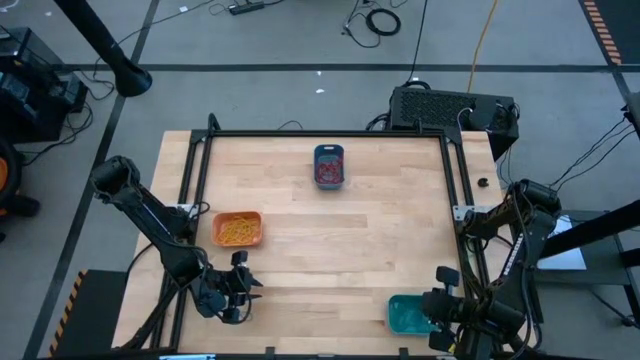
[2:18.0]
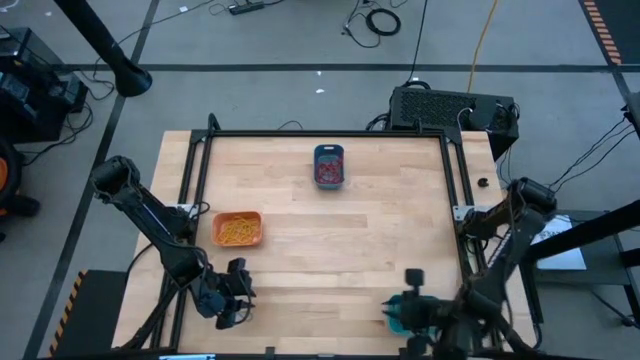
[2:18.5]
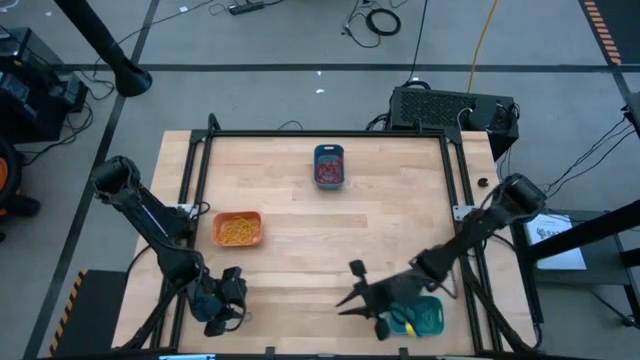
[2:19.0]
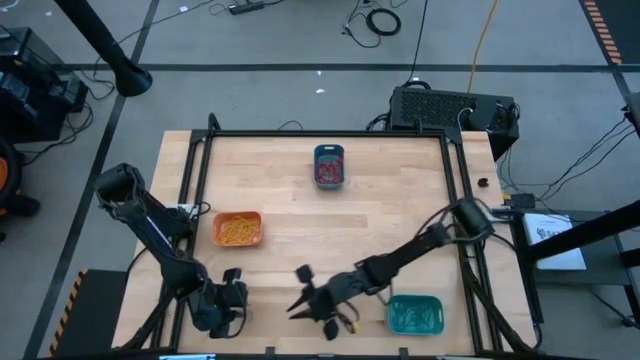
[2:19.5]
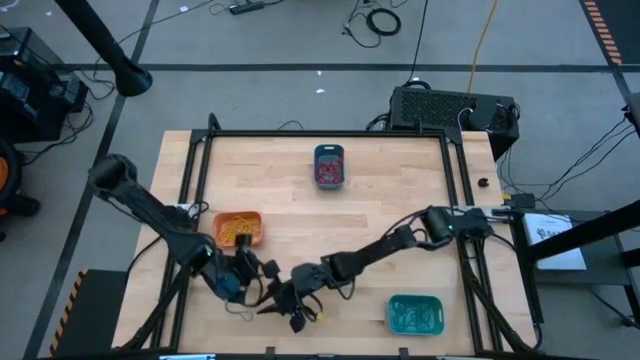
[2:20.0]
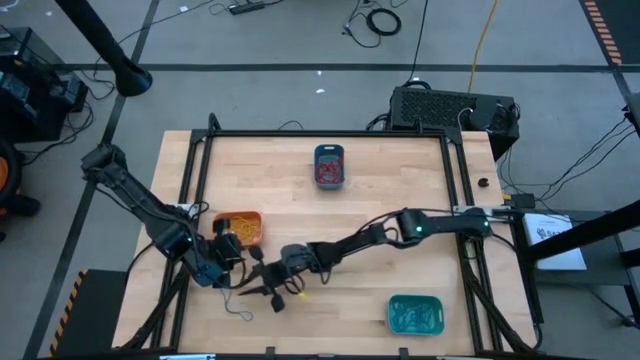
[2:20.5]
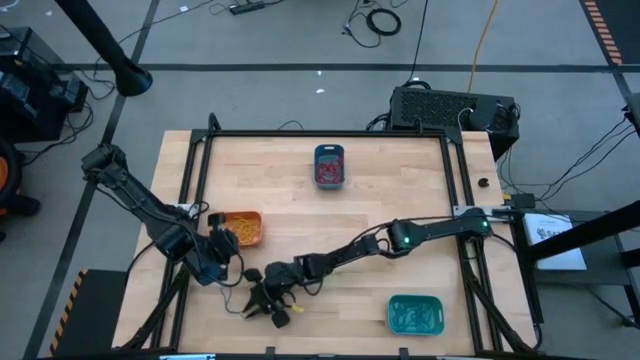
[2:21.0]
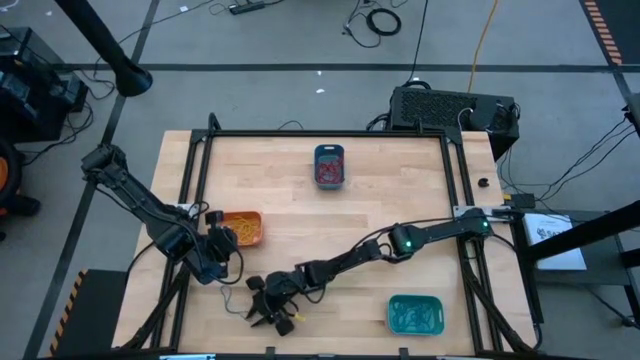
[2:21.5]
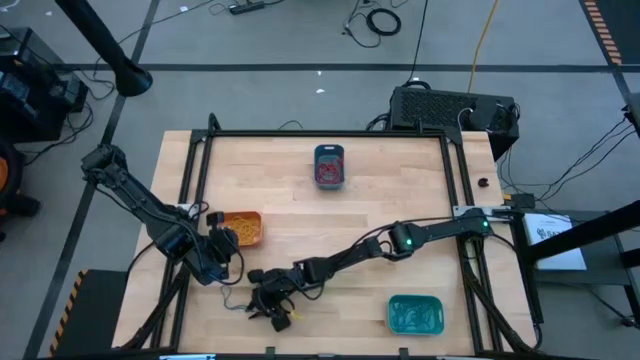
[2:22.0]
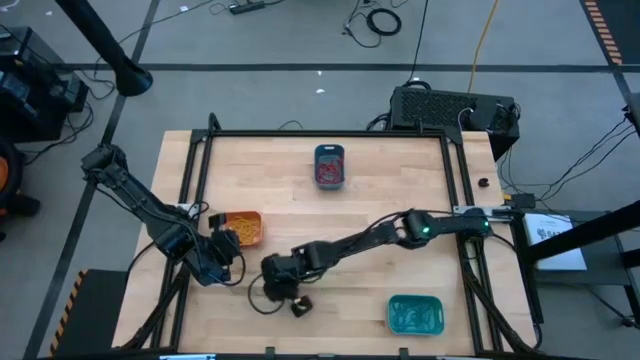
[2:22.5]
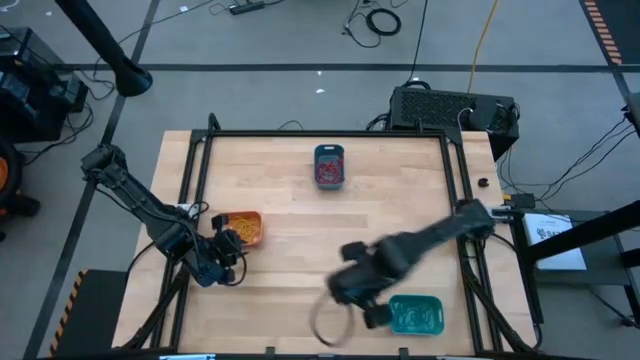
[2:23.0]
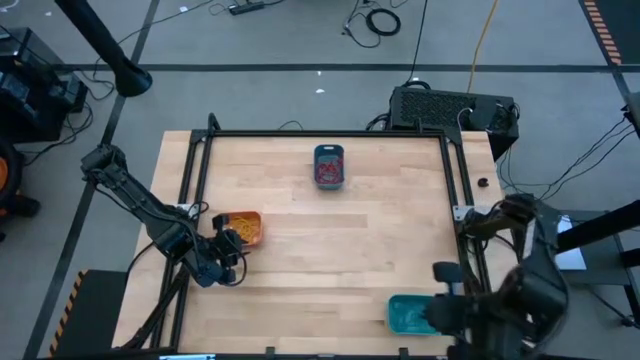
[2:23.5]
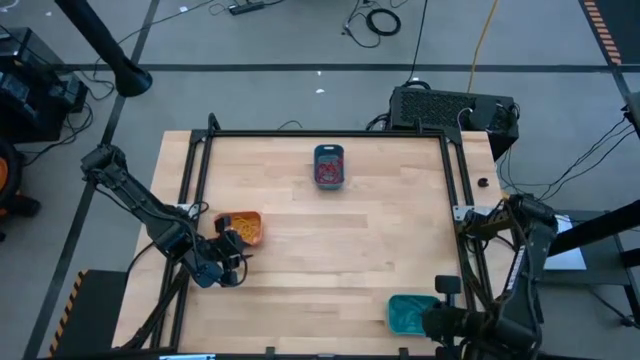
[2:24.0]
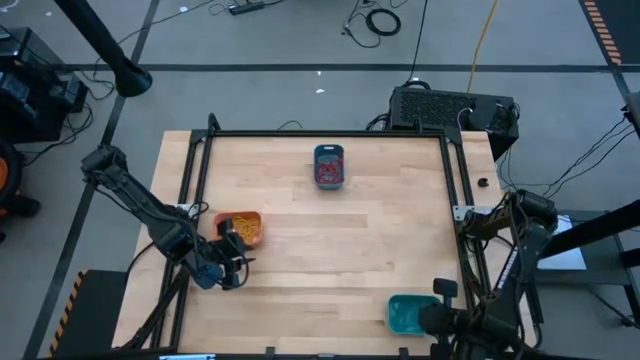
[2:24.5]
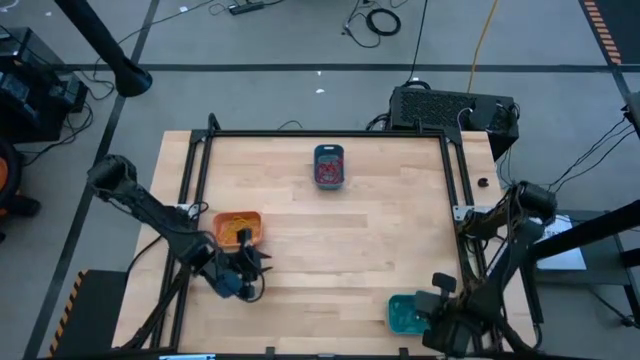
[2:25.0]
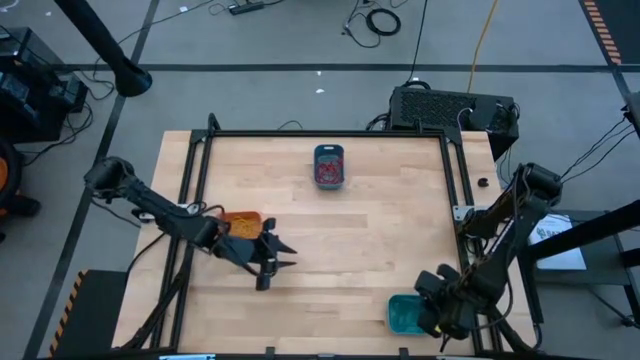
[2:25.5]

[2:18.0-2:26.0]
Task: Sort rubber bands into baskets
Put the blue rubber band into the light blue bin

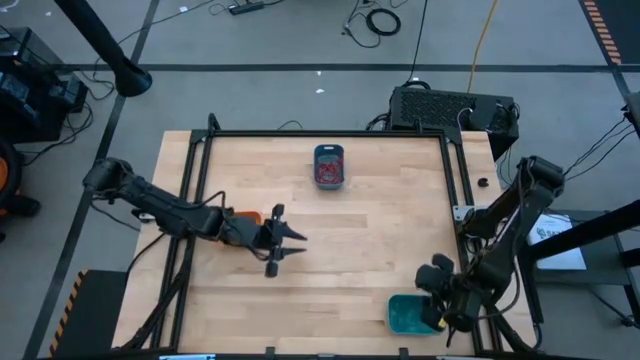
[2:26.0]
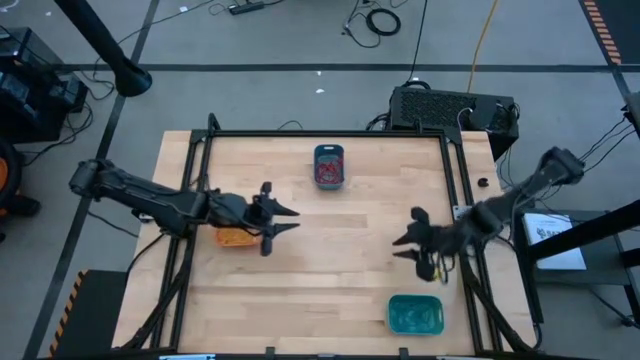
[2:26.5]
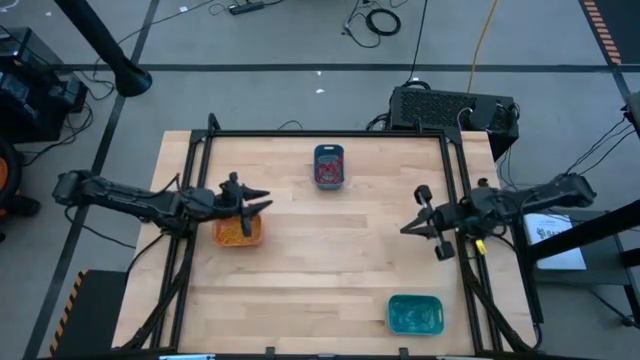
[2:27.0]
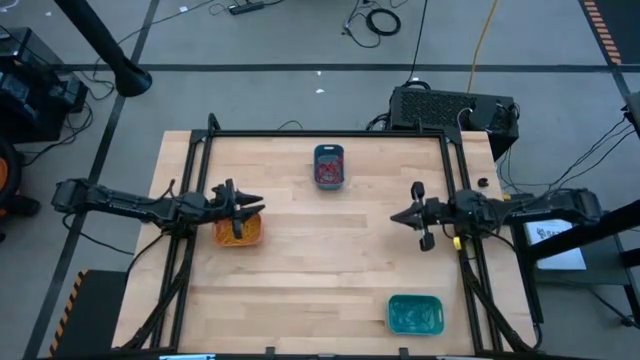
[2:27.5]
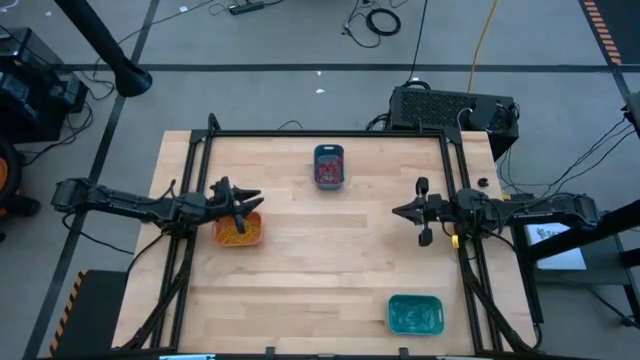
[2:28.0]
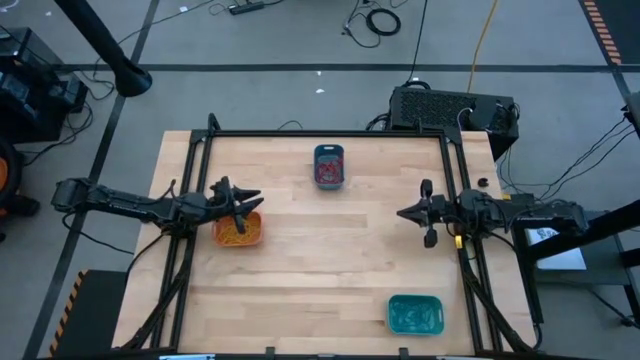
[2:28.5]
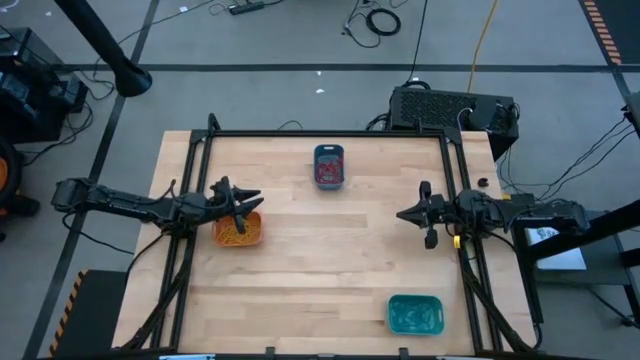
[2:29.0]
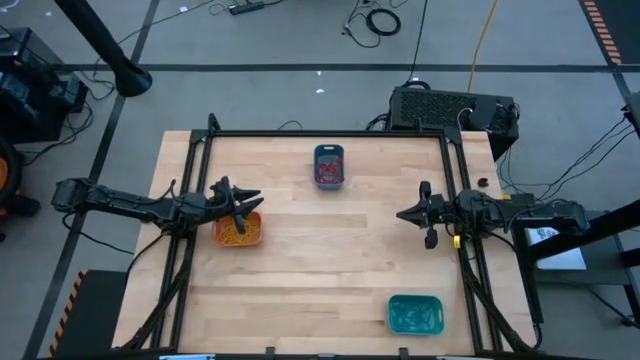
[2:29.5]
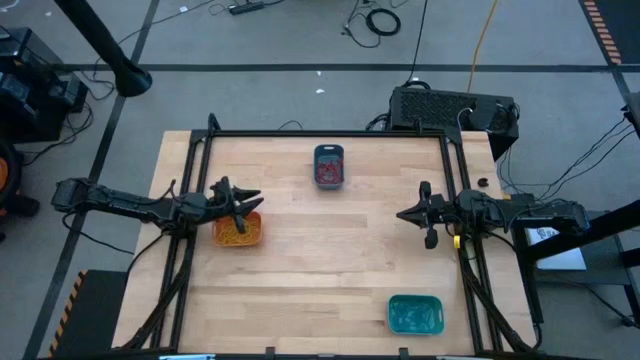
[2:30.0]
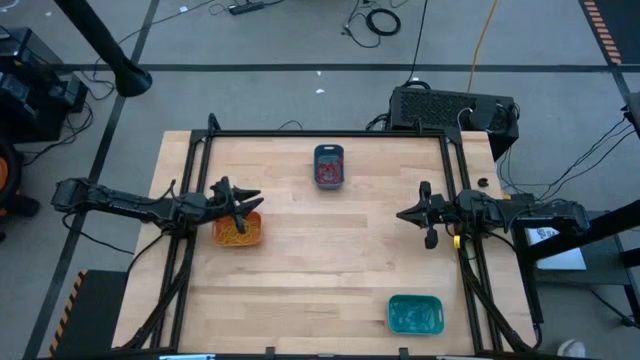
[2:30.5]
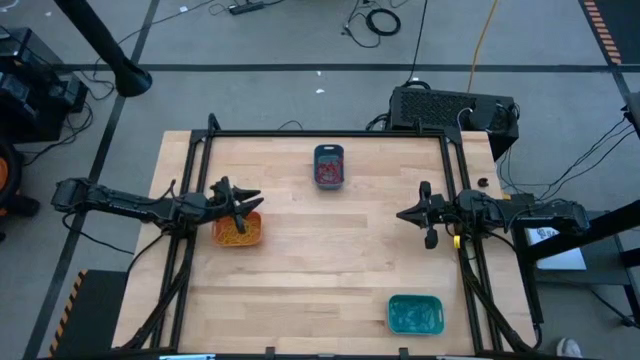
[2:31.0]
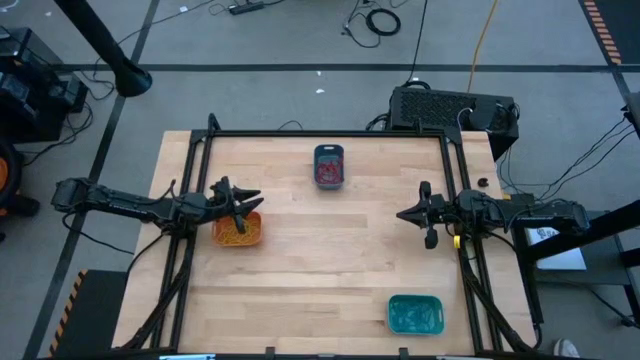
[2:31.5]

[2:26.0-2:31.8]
Return to Home Position

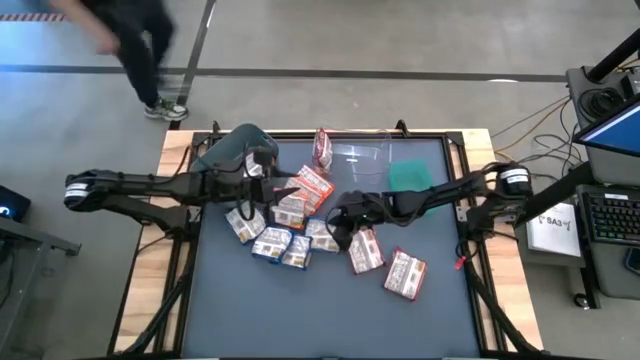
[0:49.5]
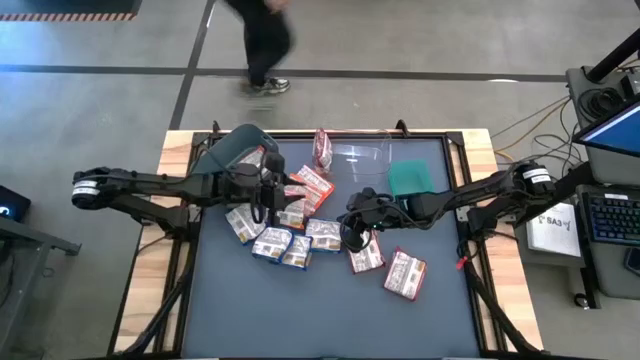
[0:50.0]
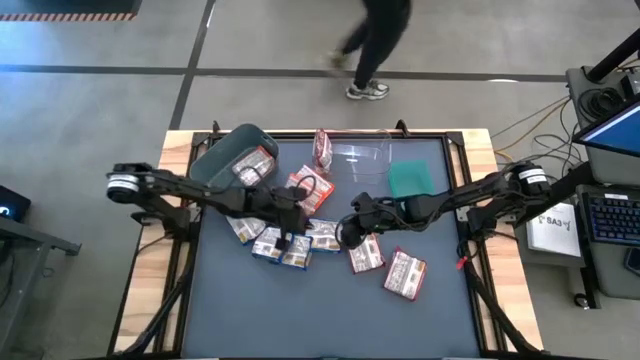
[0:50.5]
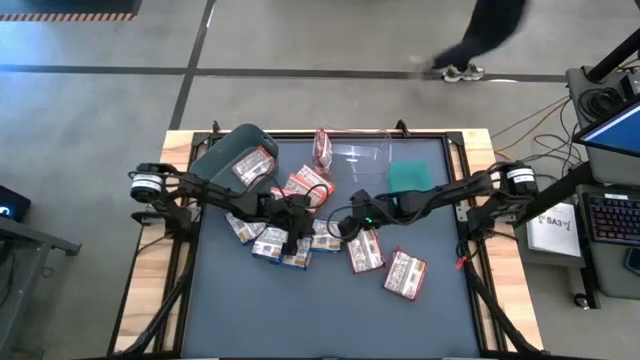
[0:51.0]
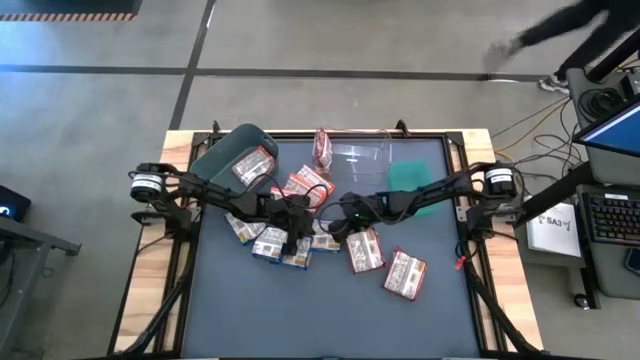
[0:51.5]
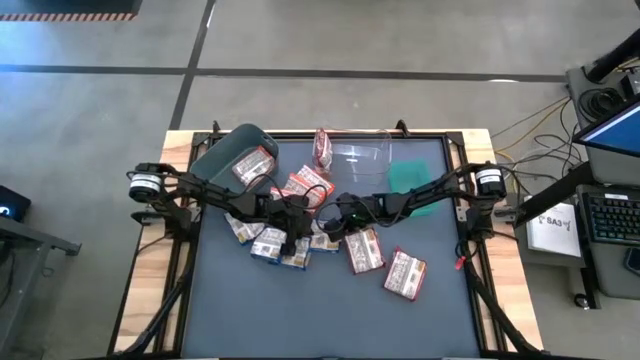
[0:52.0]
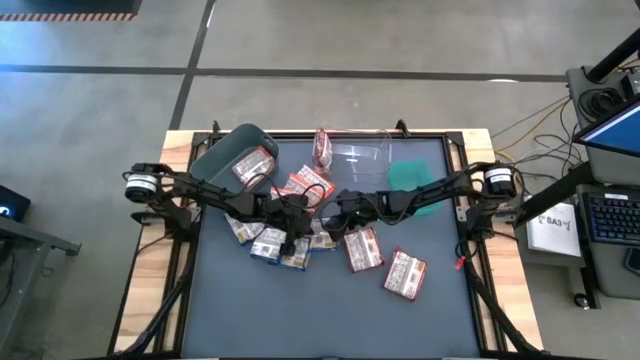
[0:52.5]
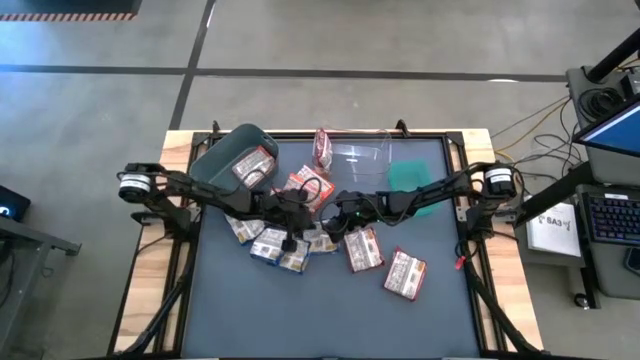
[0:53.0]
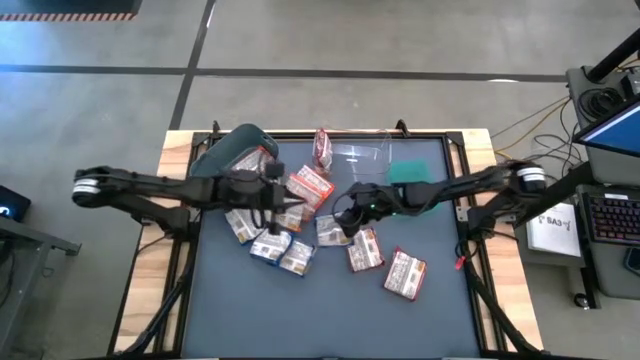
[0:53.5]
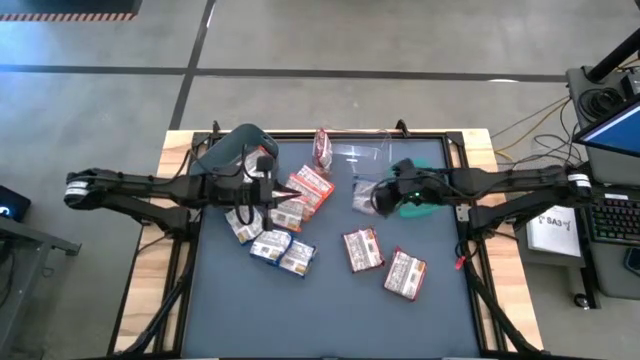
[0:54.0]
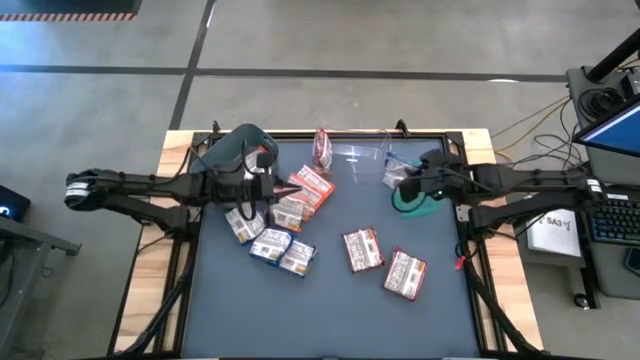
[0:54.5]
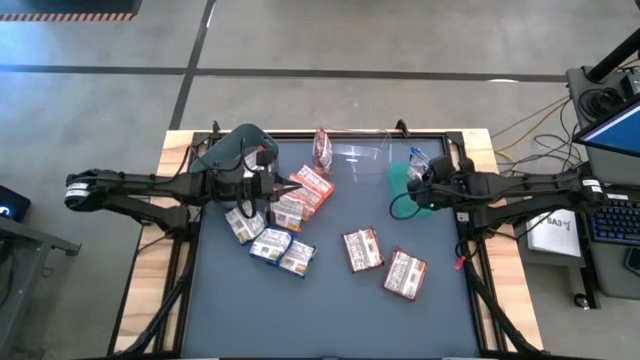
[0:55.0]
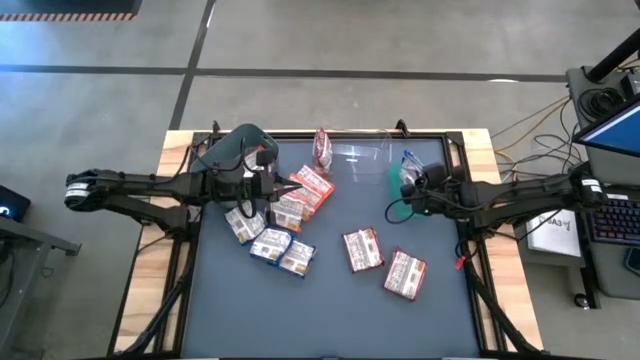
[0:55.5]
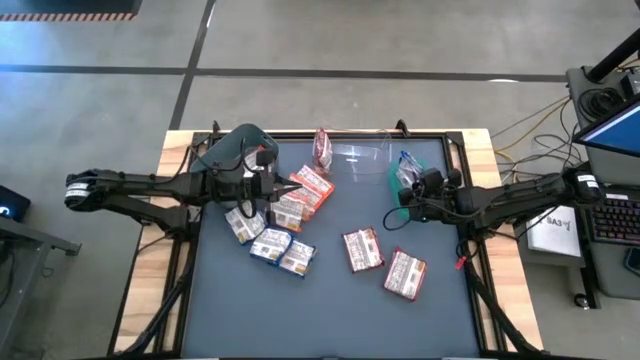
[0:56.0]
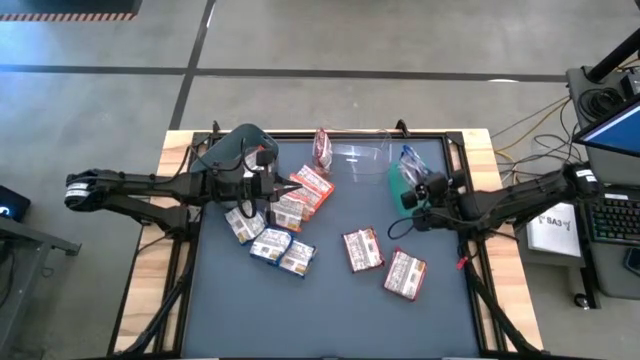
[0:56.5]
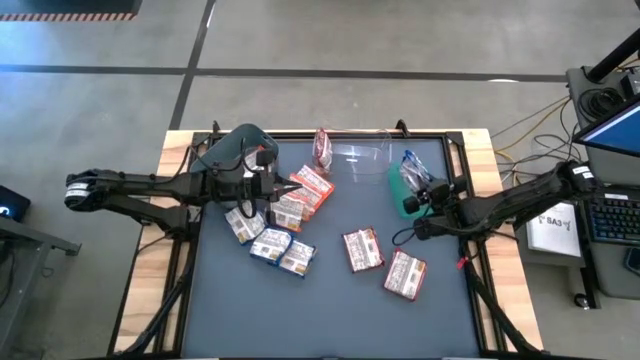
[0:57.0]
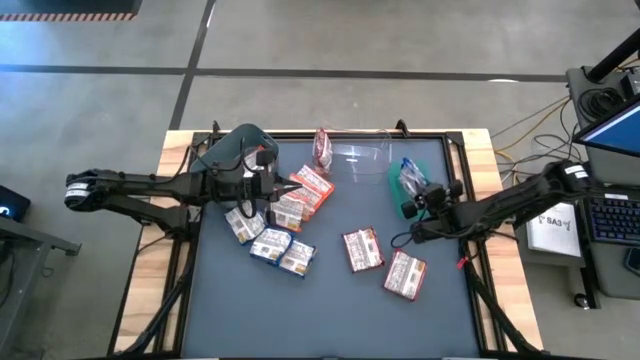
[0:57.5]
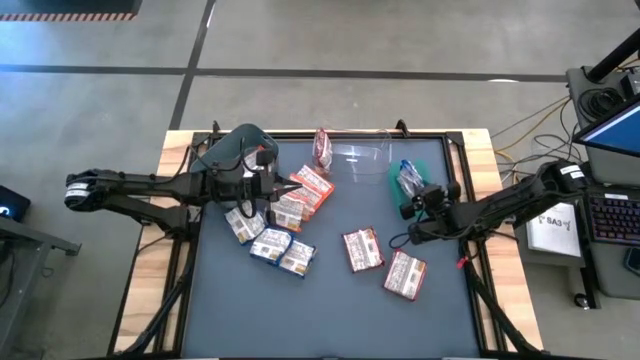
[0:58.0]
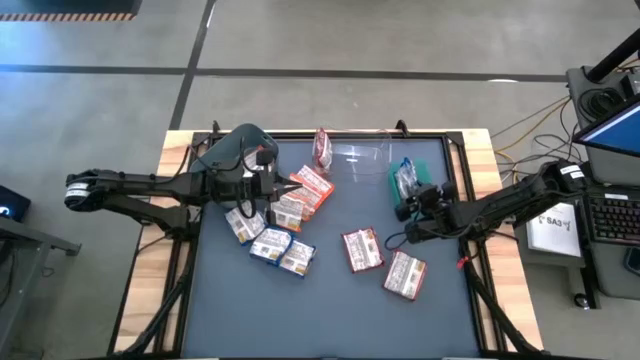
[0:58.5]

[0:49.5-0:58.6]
Task: Sort Maruchan noodles
Put the blue noodle pack into the green bin
